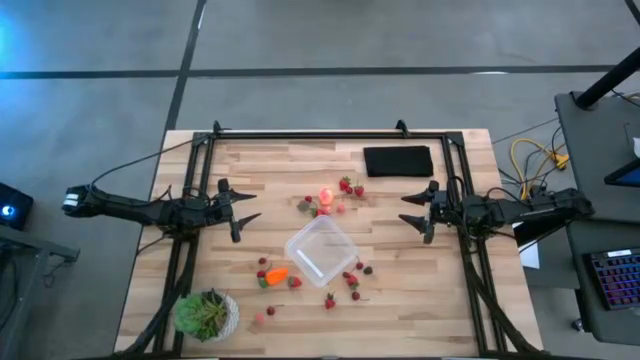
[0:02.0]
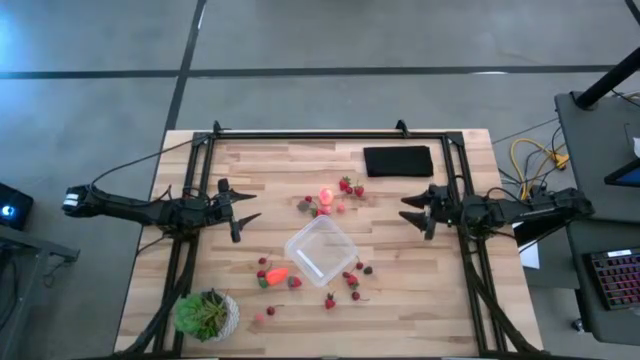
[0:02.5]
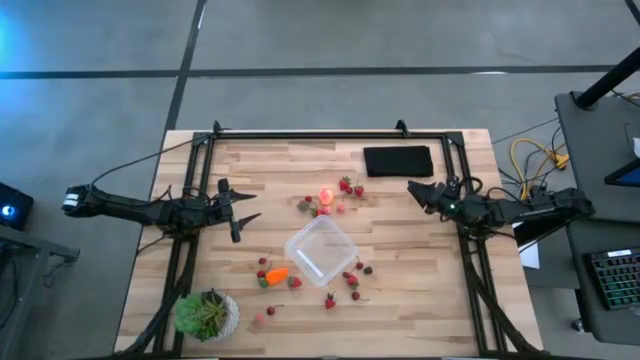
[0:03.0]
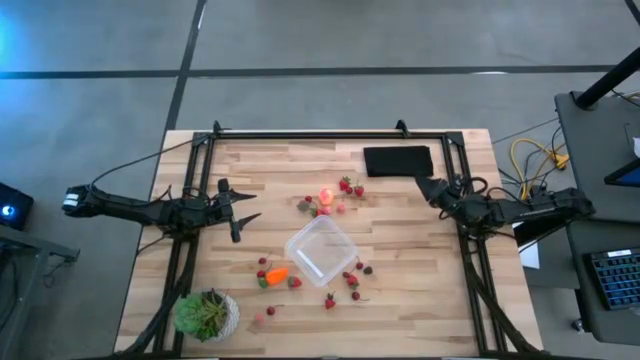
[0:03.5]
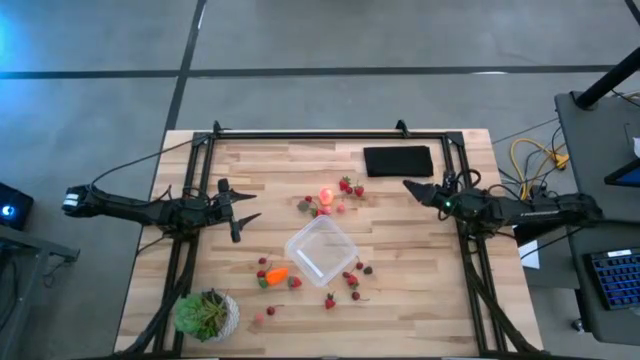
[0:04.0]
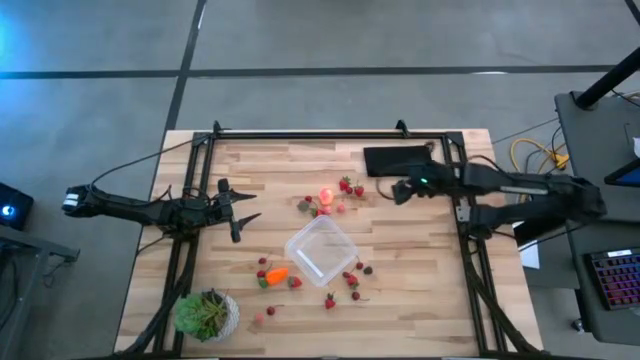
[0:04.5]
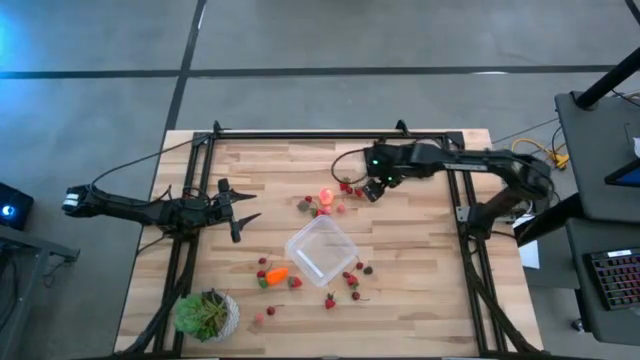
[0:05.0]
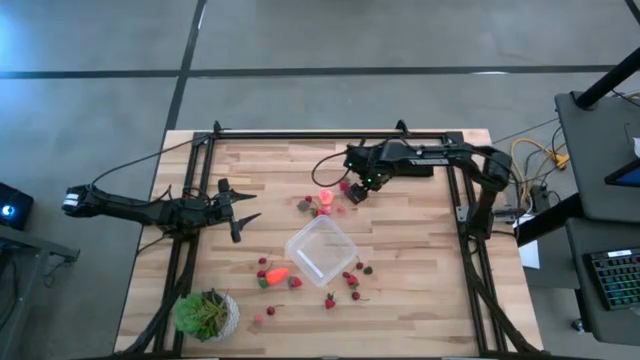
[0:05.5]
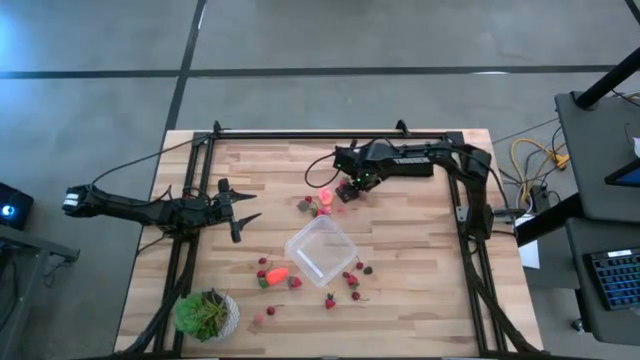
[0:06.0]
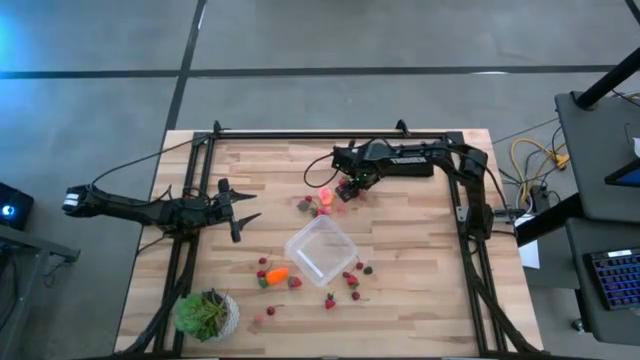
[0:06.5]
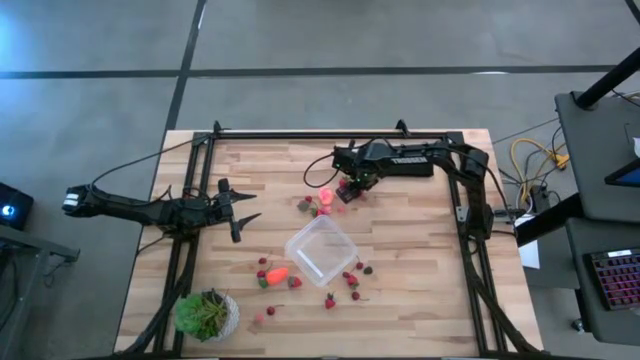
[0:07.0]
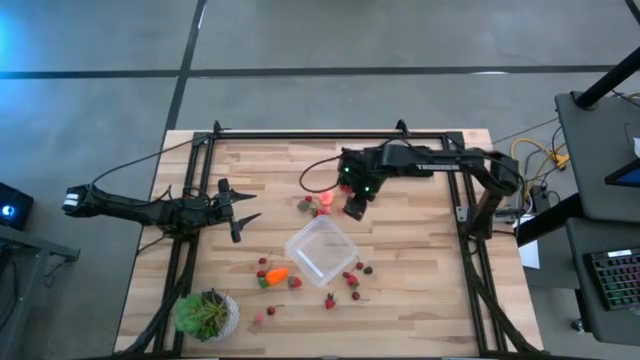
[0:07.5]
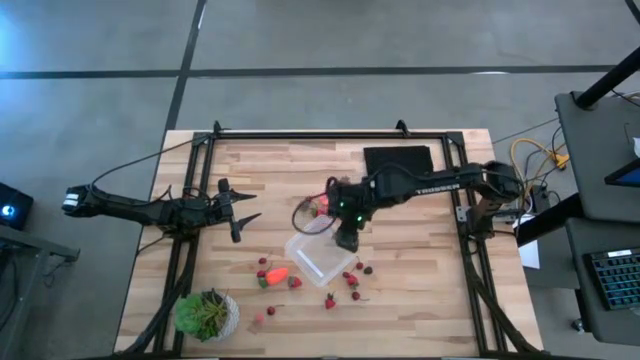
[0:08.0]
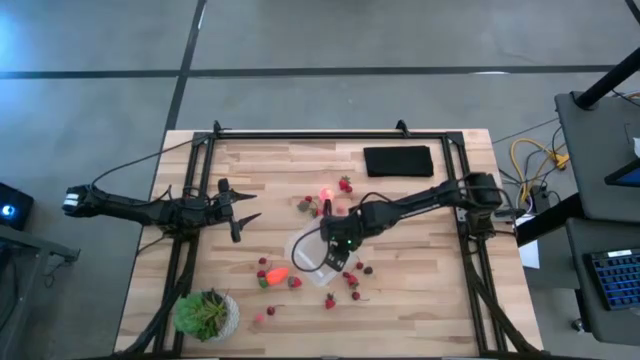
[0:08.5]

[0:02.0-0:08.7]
Task: Pick and placing Produce into tupperware
Put the red strawberry into the transparent container

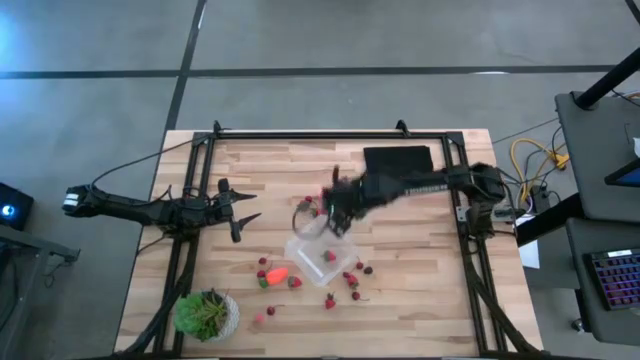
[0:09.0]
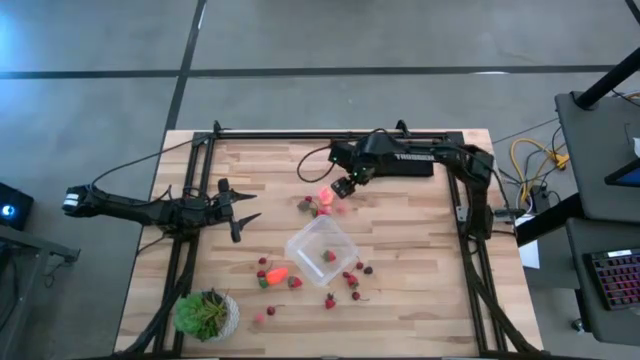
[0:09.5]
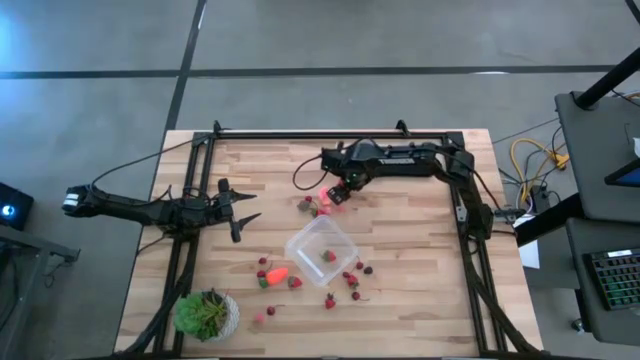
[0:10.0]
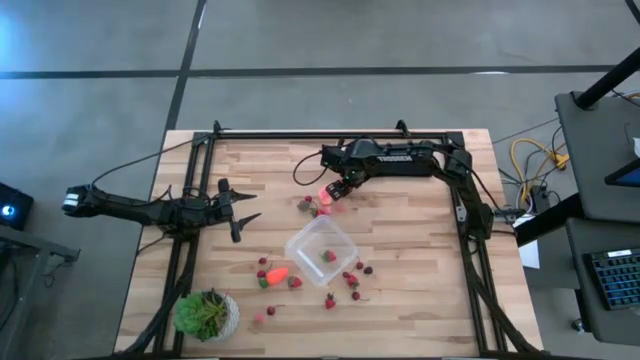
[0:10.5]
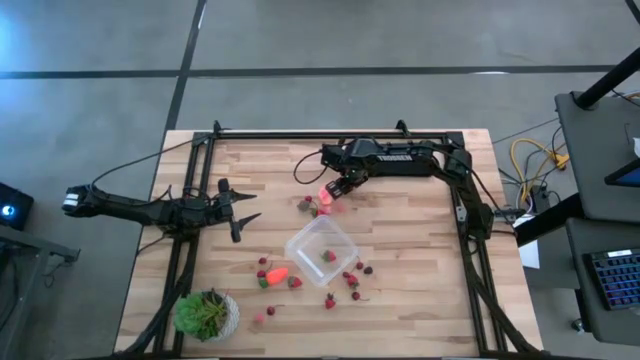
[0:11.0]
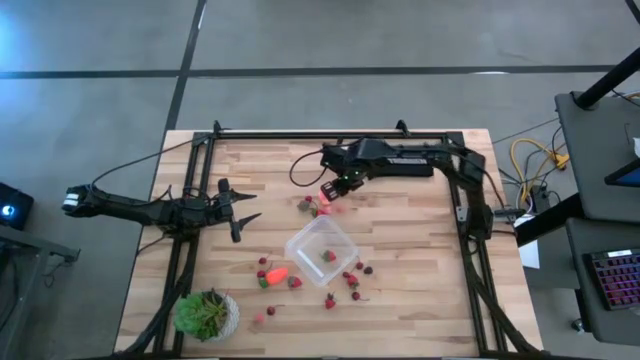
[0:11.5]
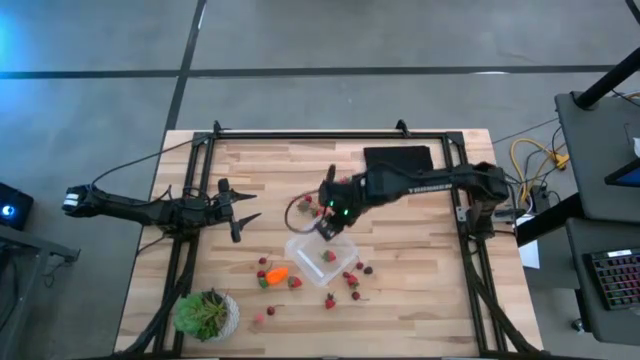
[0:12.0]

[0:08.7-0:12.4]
Put the red cherry into the transparent container

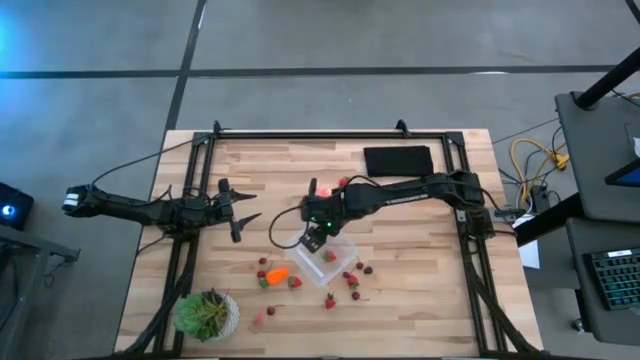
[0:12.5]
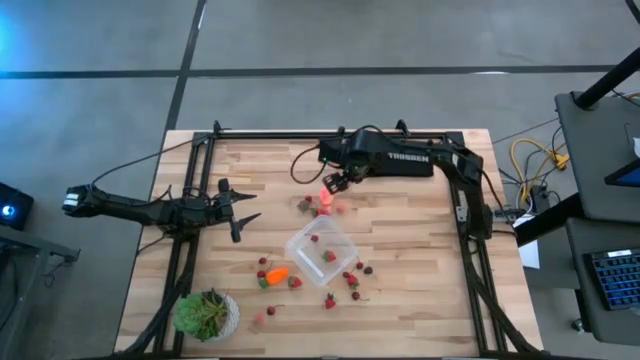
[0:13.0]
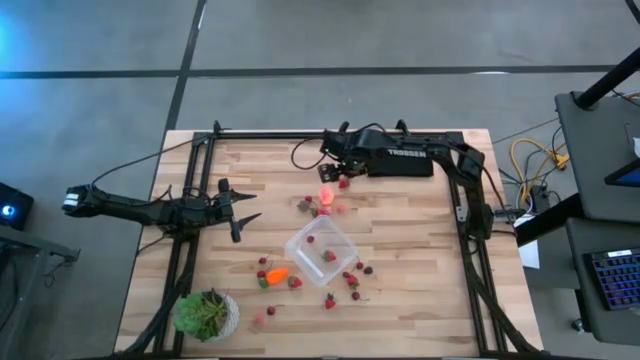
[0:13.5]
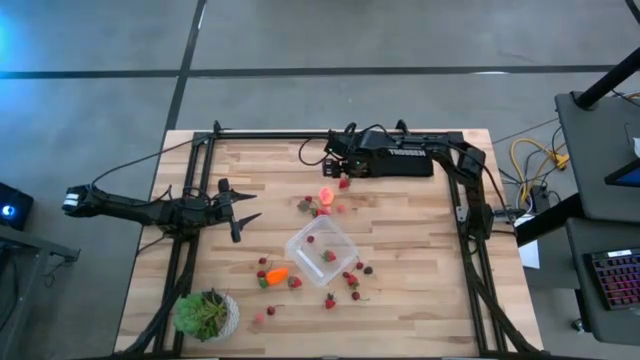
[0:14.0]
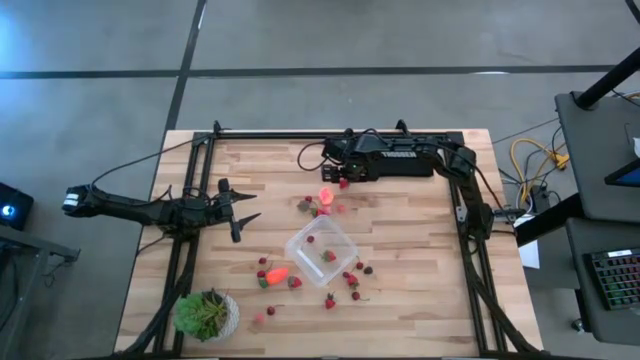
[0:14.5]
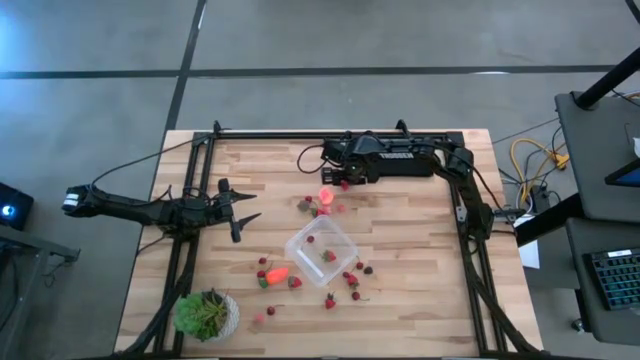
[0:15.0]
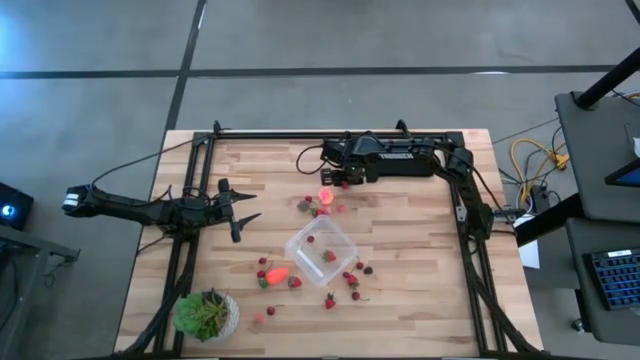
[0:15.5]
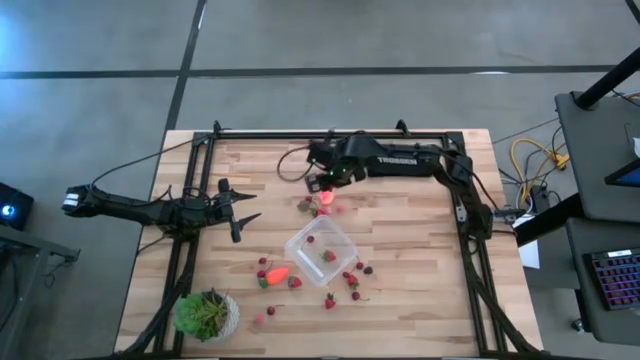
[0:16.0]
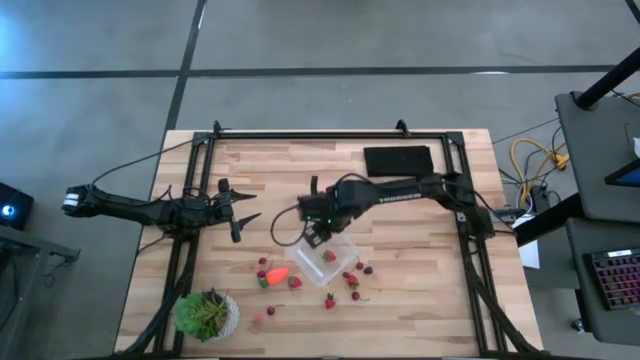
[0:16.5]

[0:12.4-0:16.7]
Put the red strawberry into the transparent container

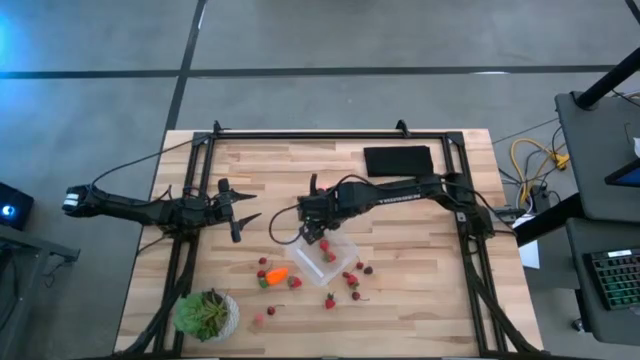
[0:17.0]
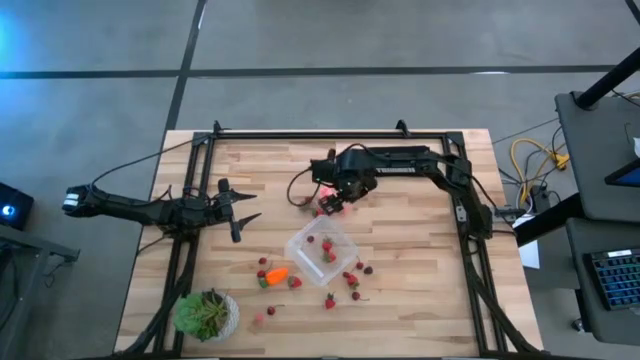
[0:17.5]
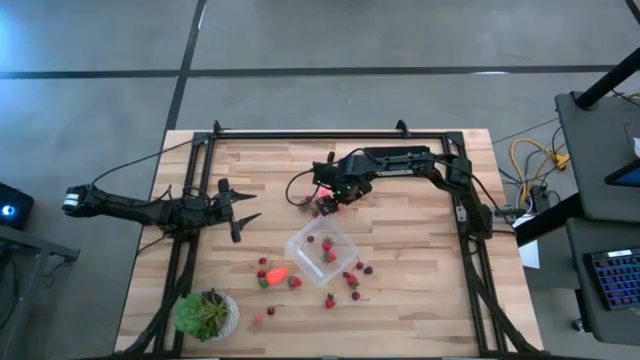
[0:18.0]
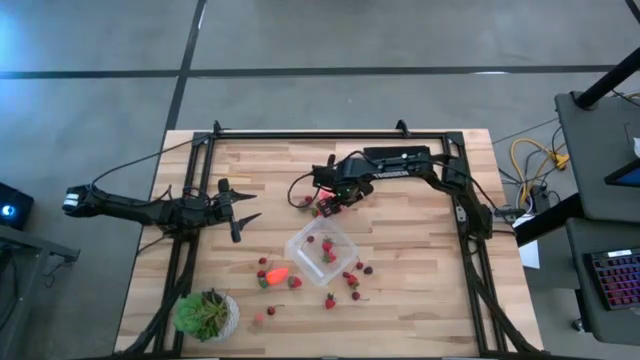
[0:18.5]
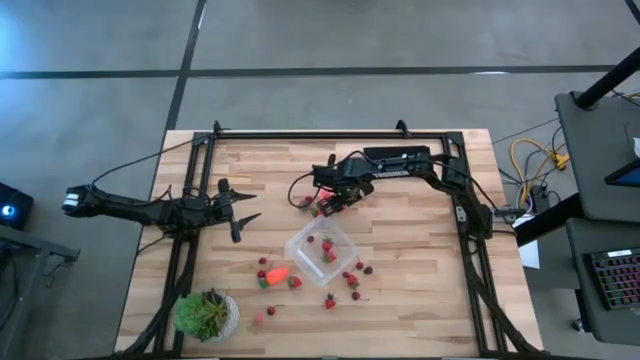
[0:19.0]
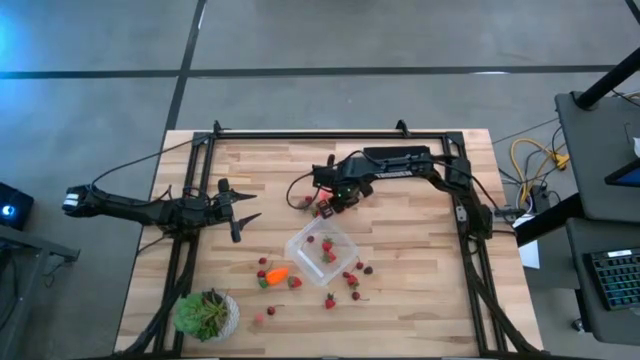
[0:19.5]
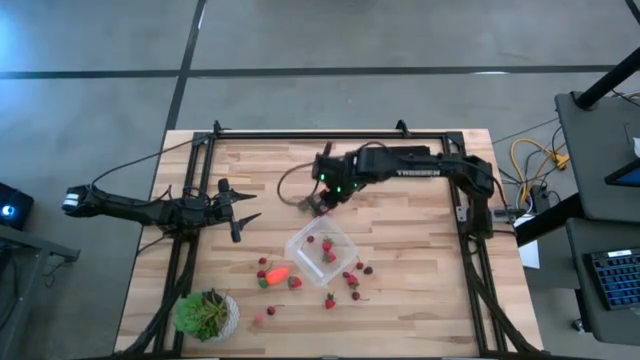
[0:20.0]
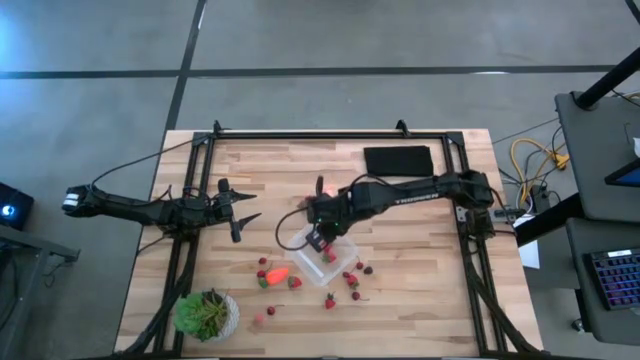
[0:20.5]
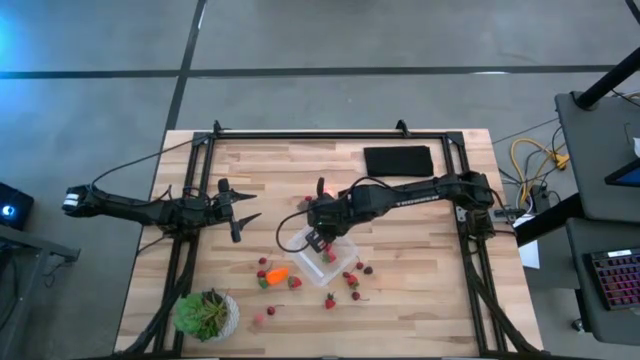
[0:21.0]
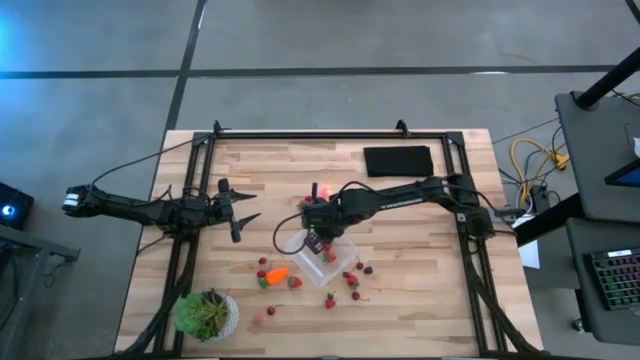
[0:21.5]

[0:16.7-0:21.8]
Put the pink peach into the transparent container
